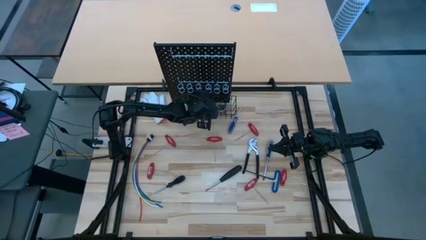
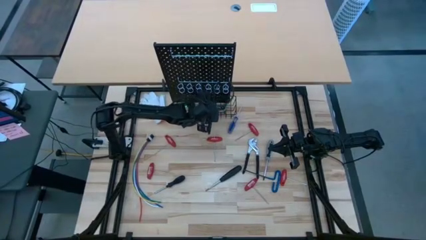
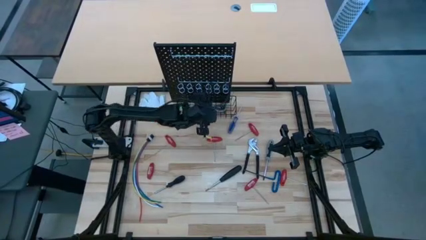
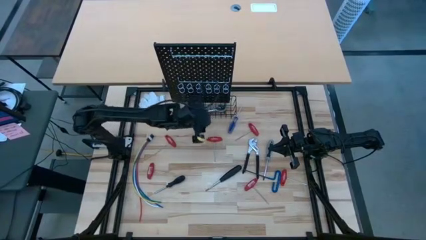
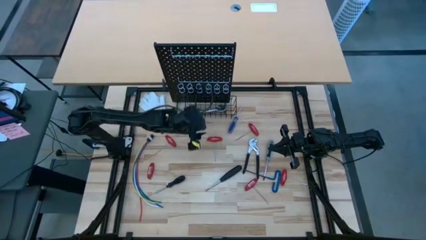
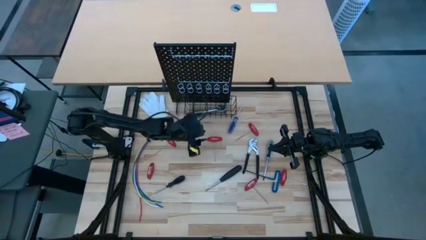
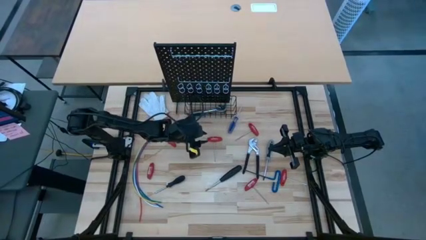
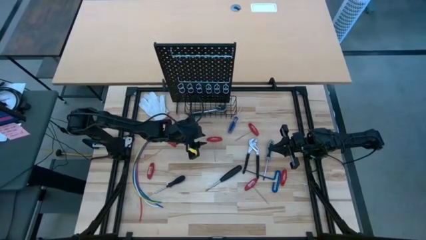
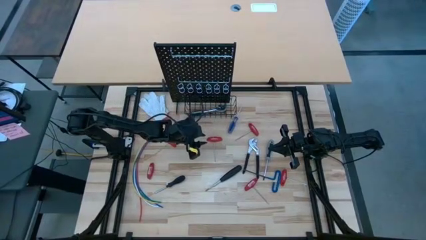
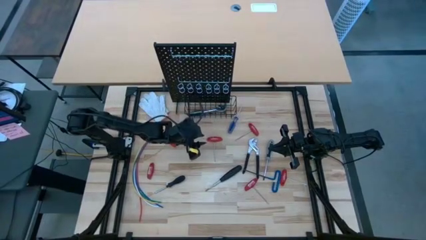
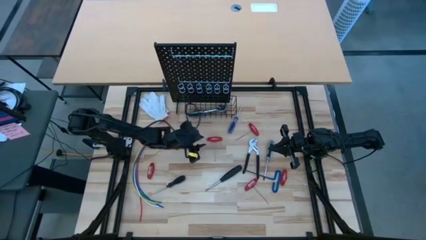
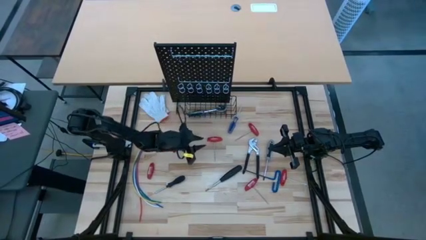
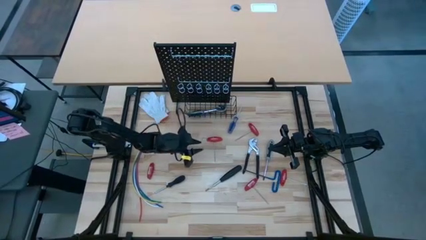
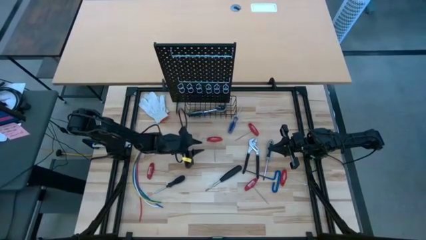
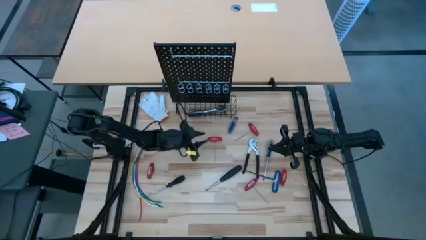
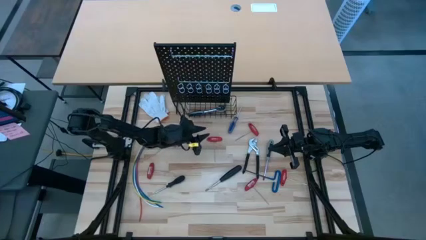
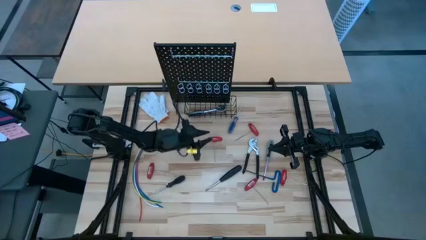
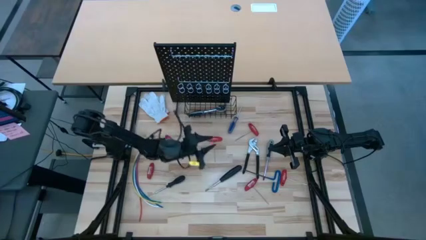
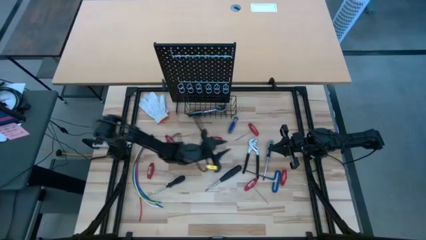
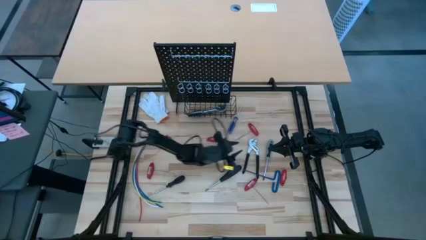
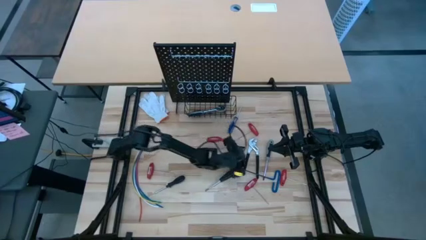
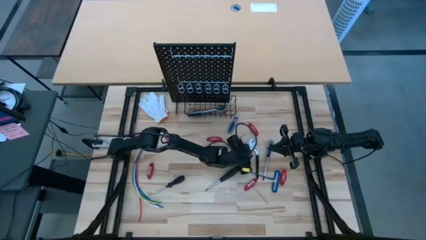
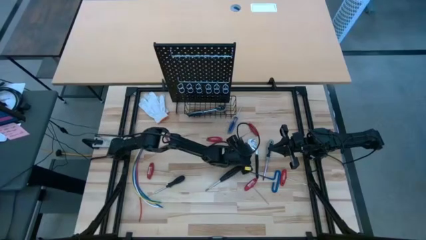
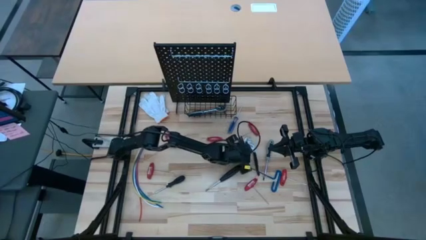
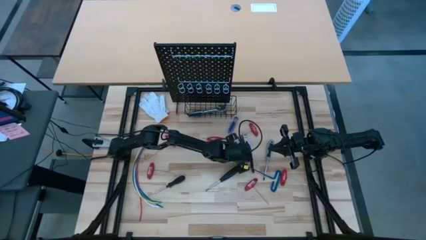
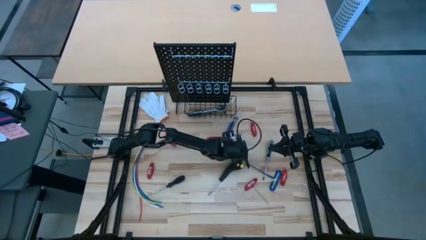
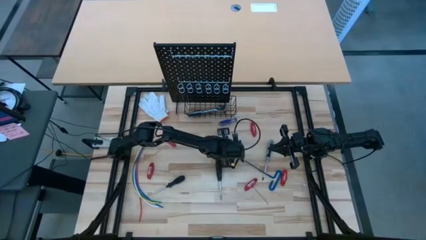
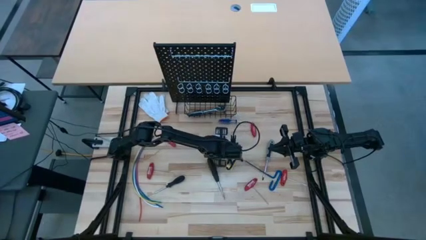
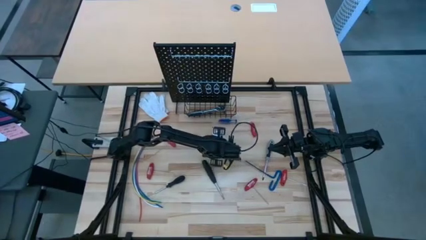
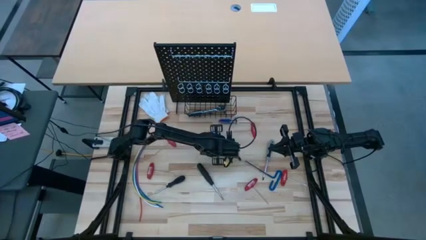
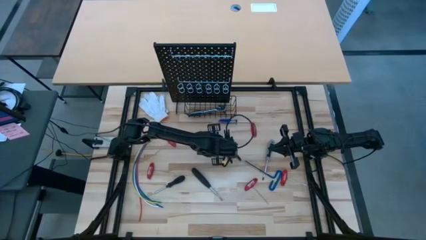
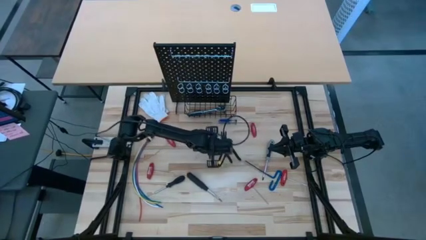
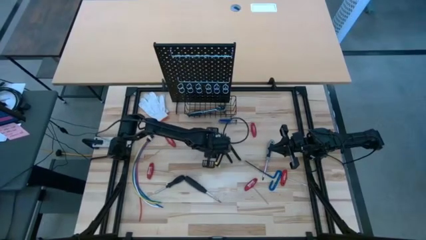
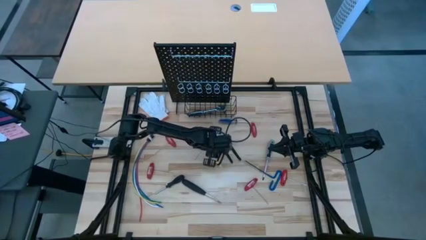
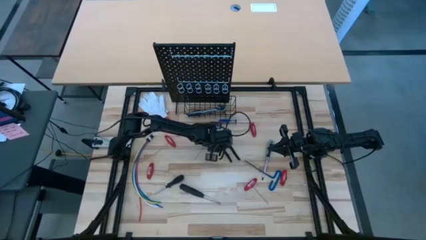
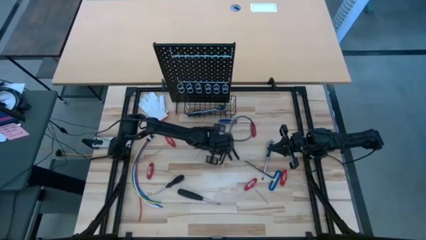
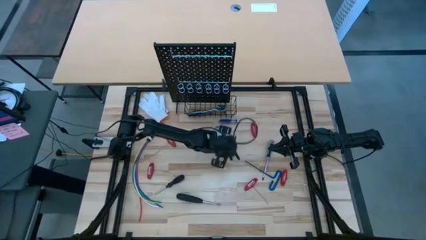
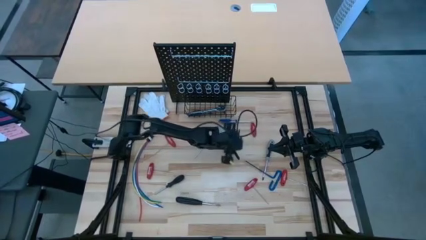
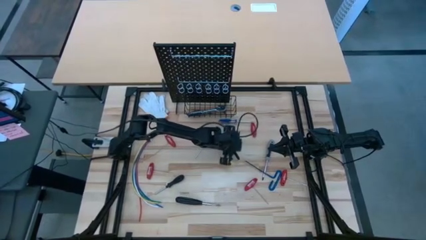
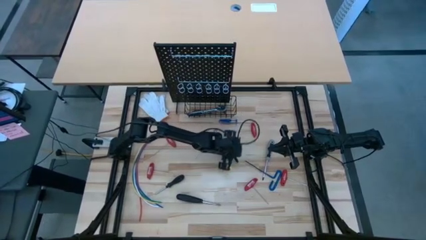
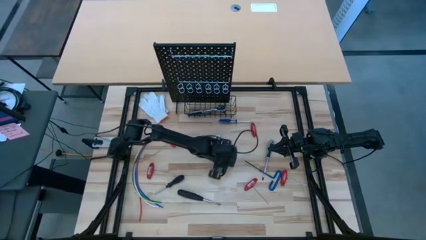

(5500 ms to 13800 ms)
Task: Hang tools onto peg board
Put the slip joint plier into the black wire basket on the black pegboard

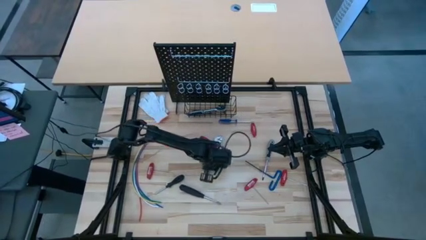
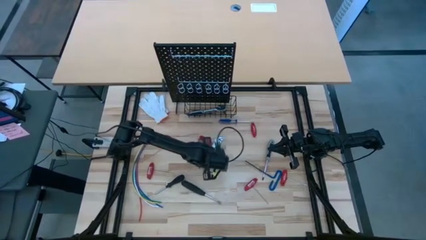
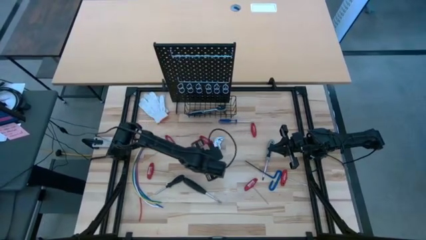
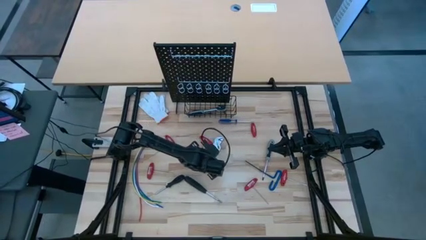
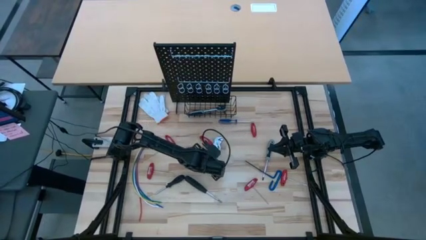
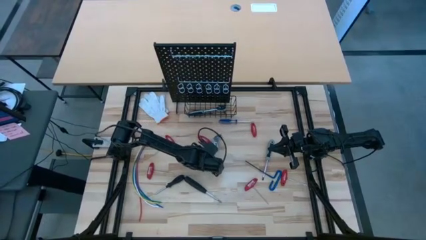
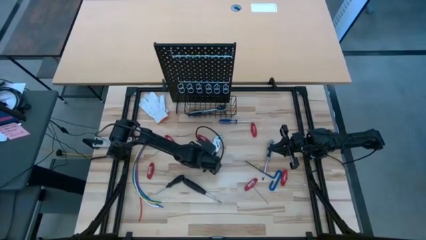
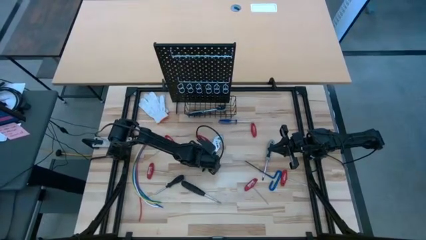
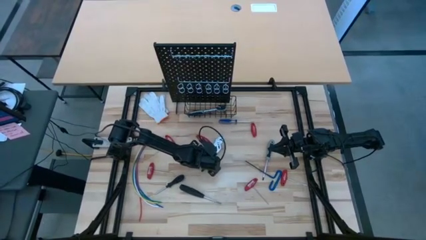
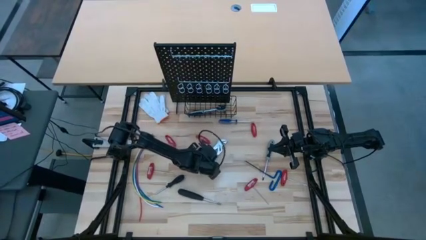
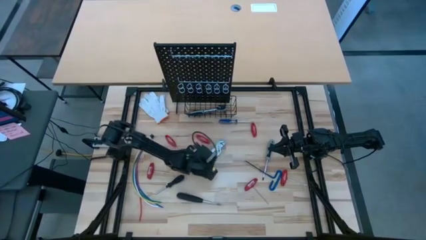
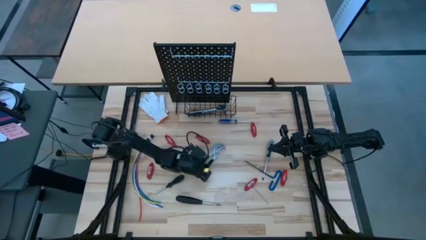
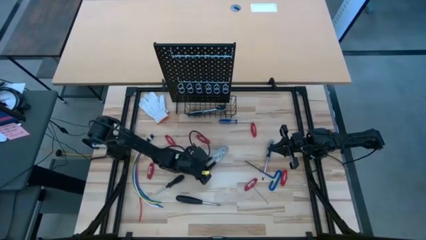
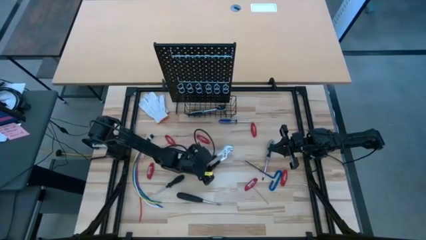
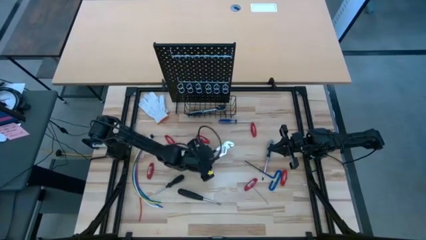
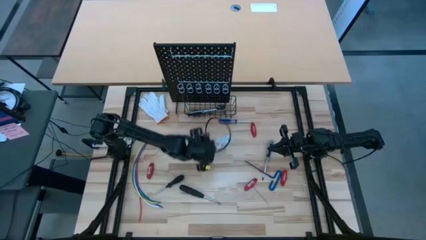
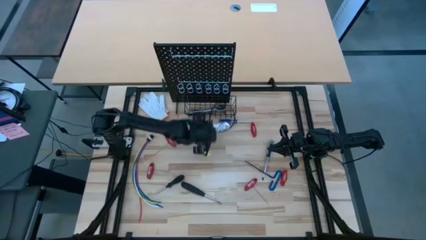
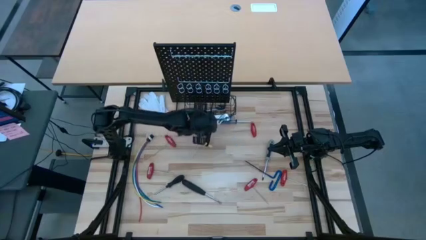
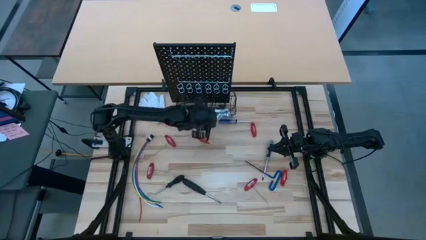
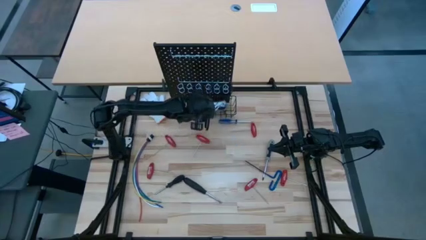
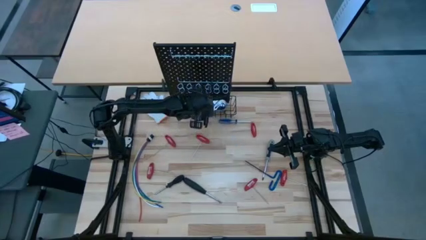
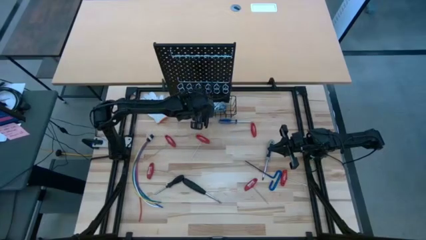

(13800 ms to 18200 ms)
Put the slip joint plier into the black wire basket on the black pegboard

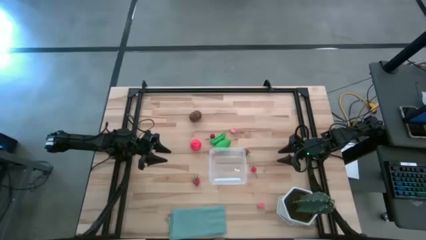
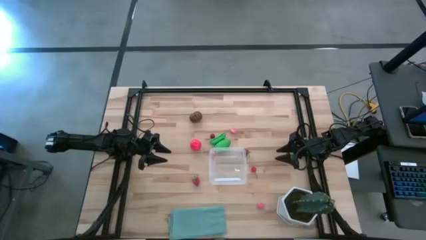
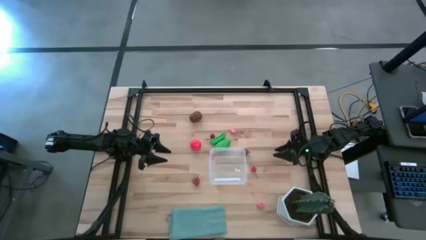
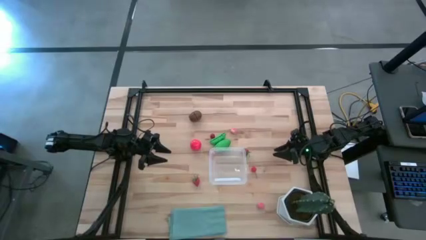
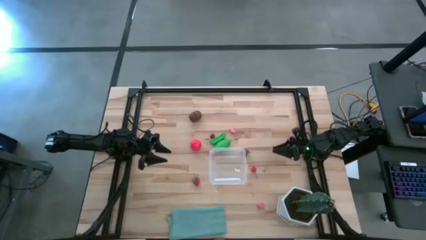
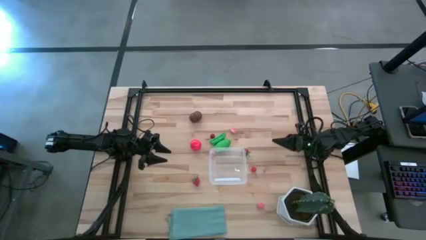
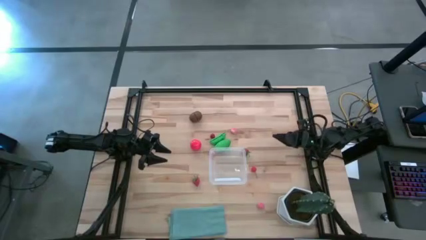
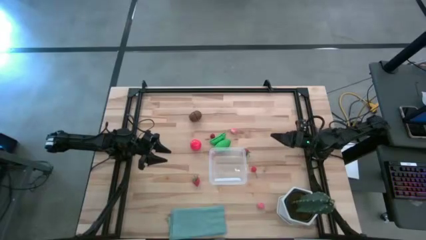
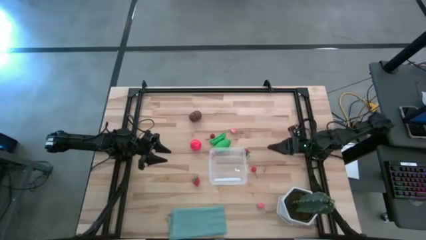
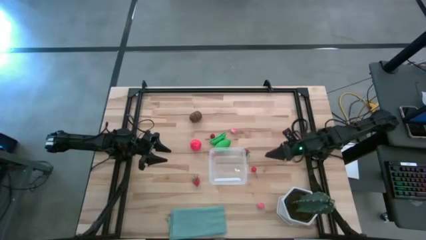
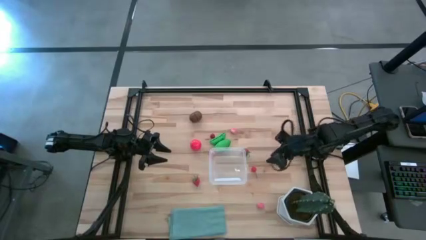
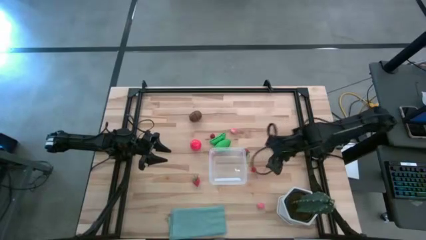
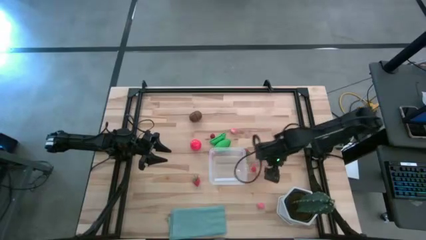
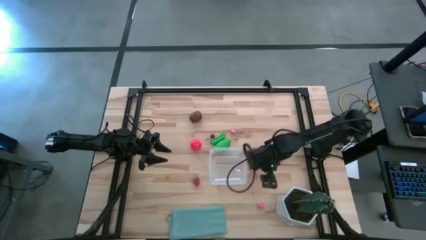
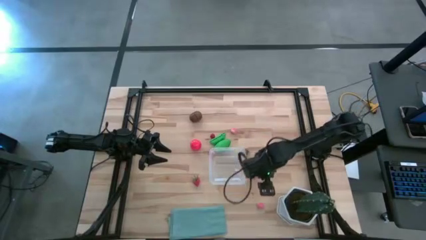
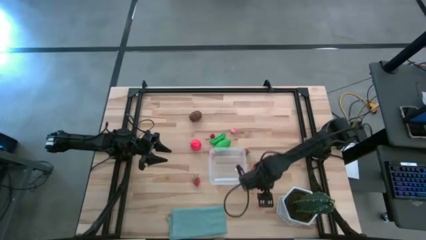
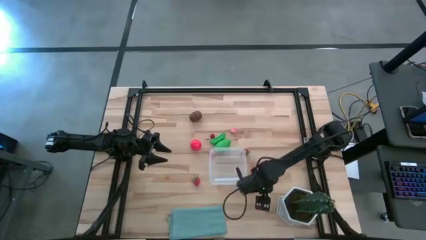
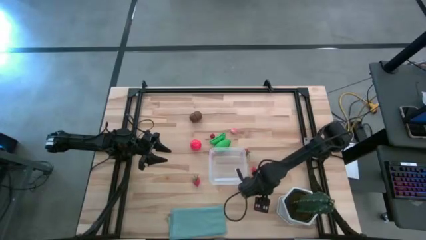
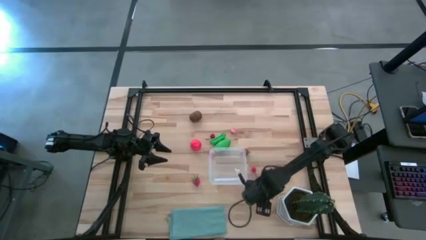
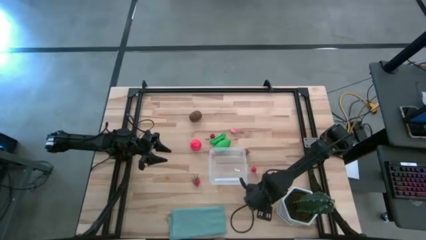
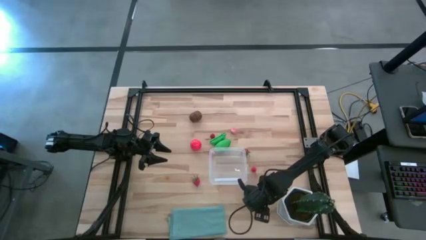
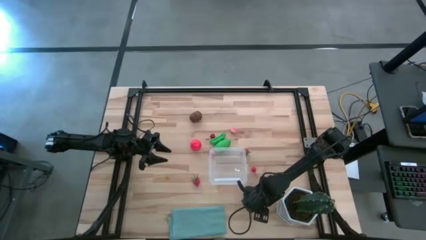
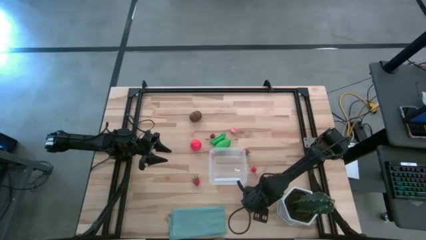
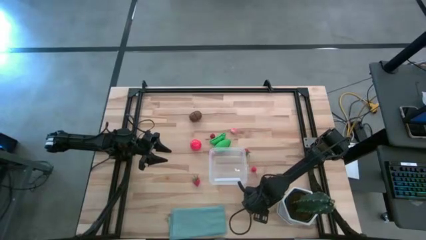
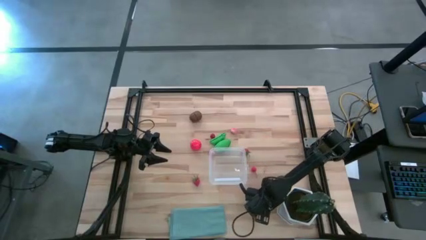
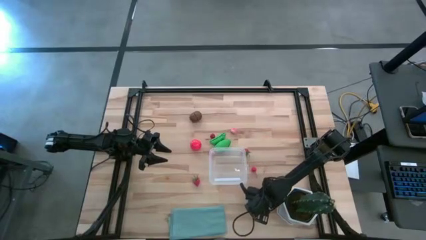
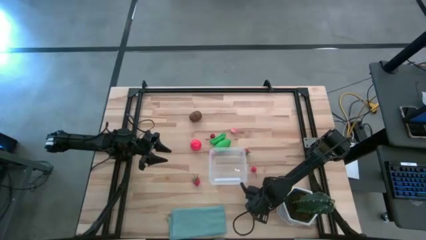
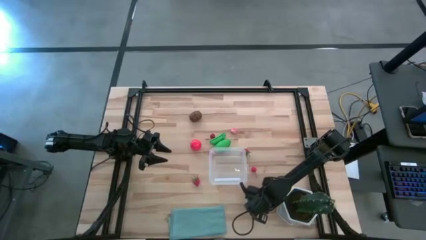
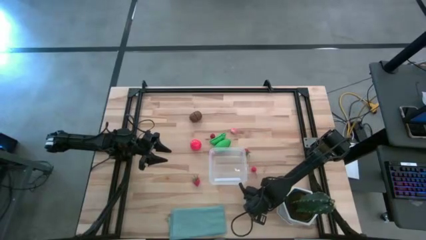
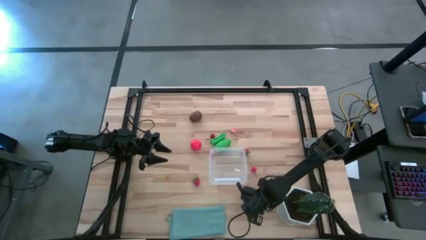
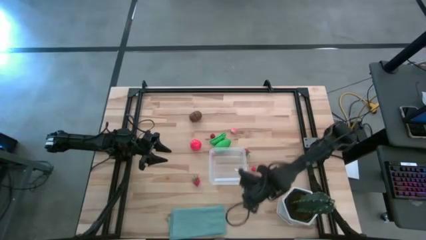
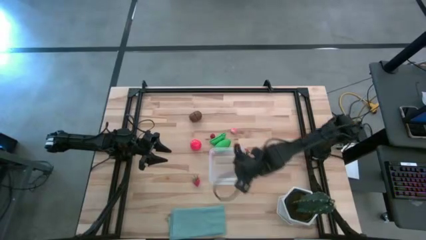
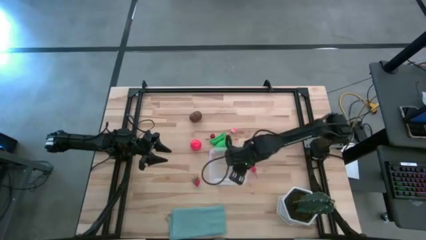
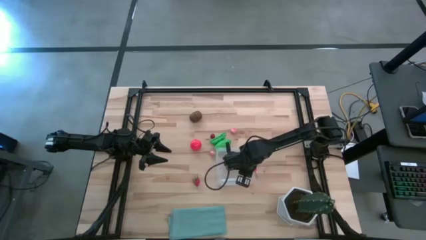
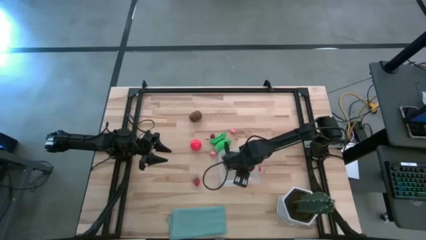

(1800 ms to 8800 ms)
Task: Pick and placing Produce into tupperware
Put the bottom peach into the transparent container
